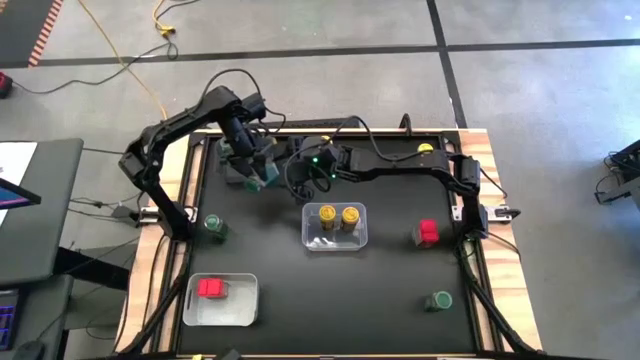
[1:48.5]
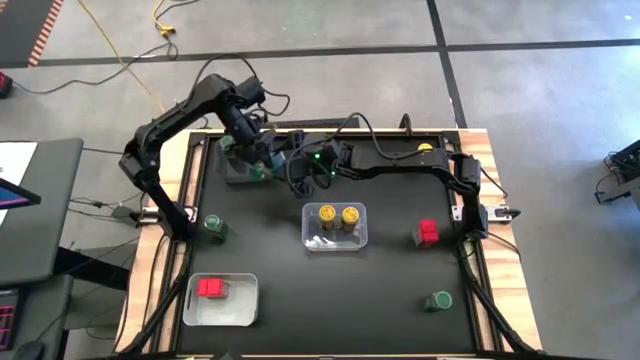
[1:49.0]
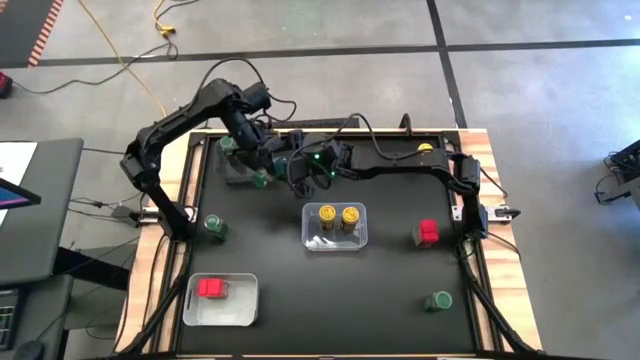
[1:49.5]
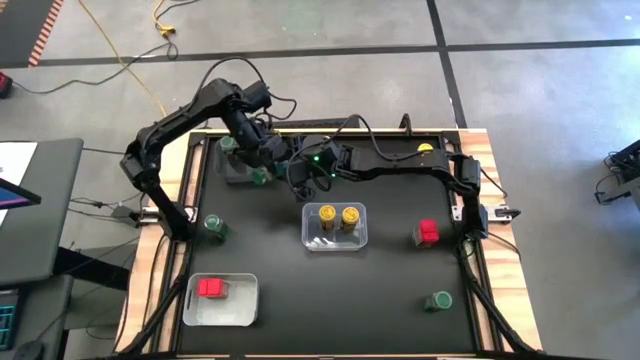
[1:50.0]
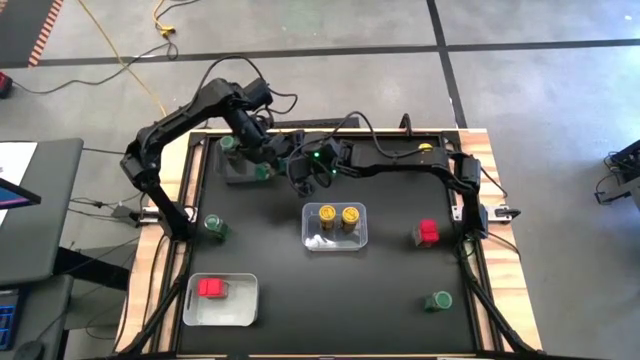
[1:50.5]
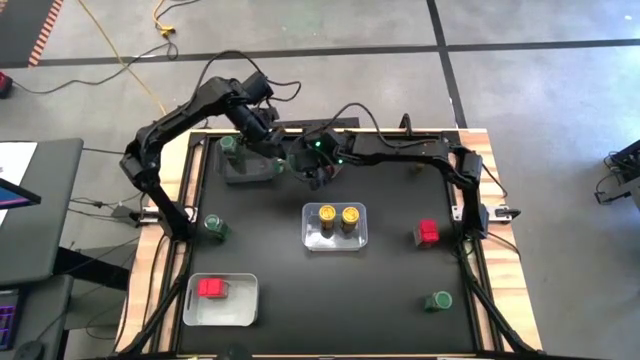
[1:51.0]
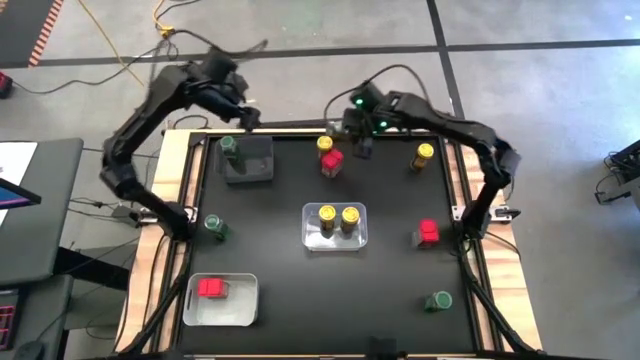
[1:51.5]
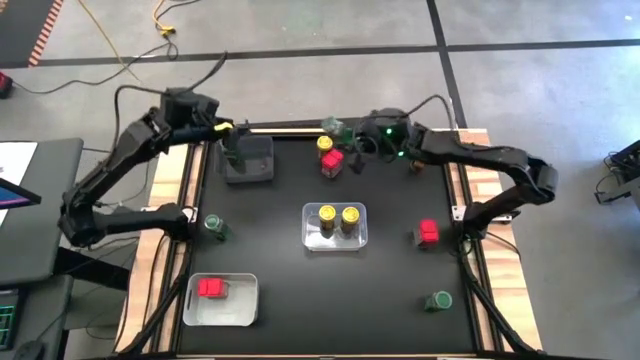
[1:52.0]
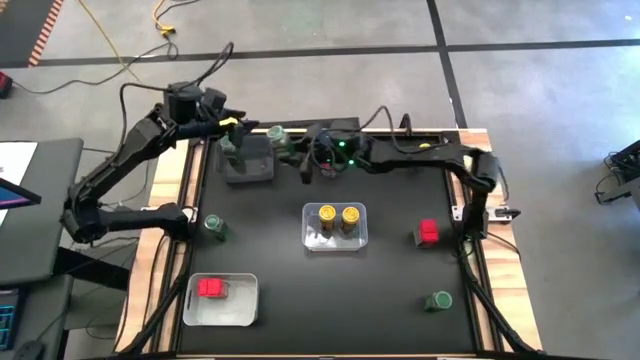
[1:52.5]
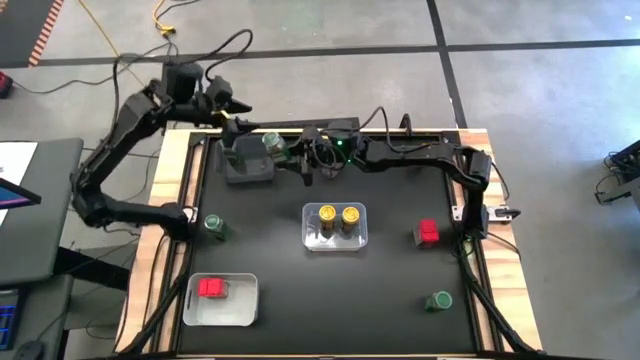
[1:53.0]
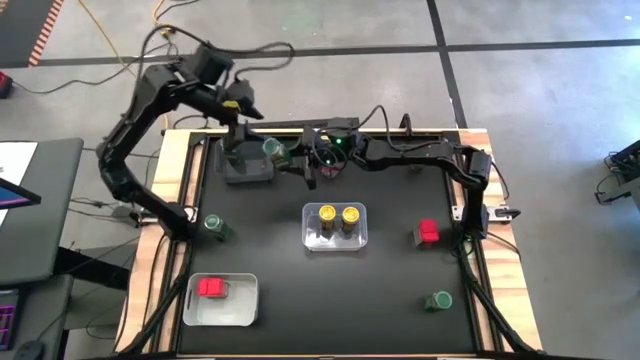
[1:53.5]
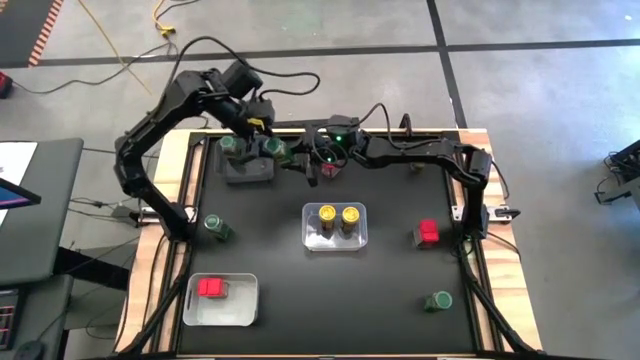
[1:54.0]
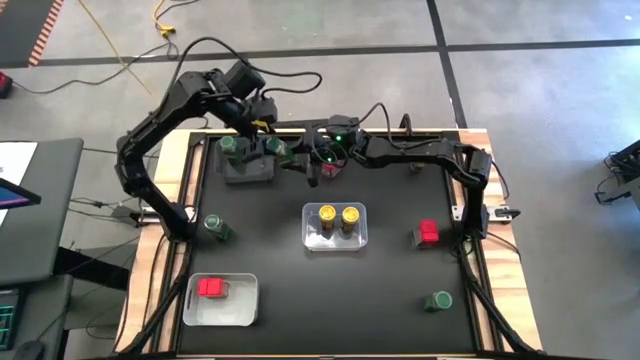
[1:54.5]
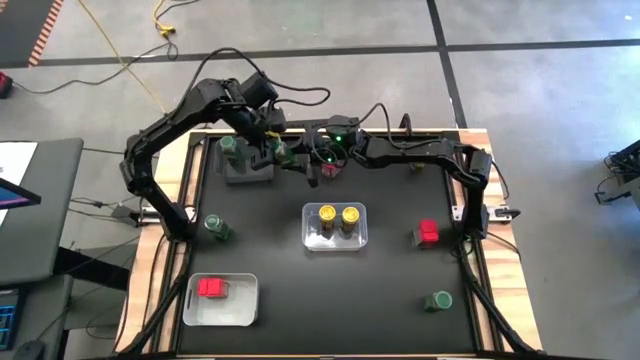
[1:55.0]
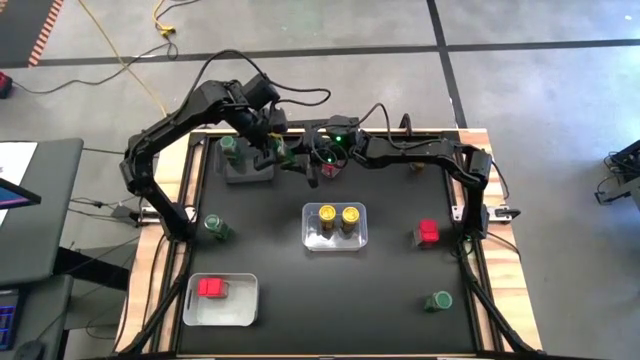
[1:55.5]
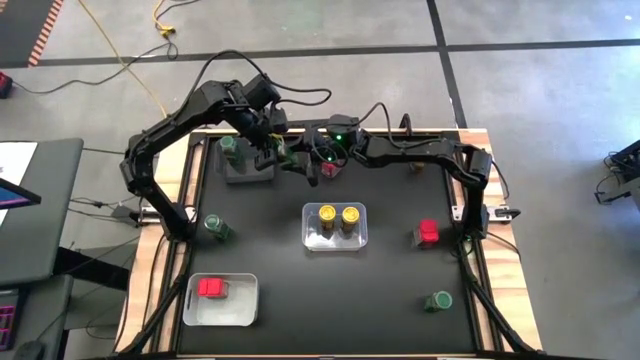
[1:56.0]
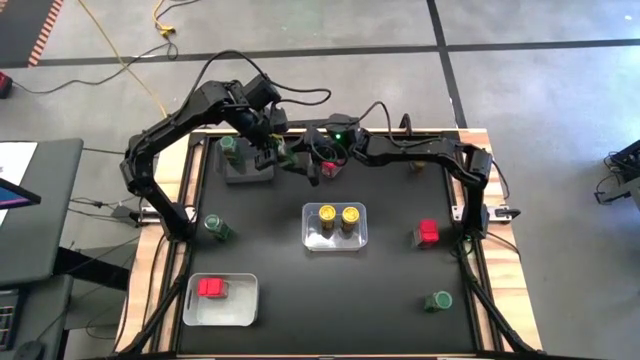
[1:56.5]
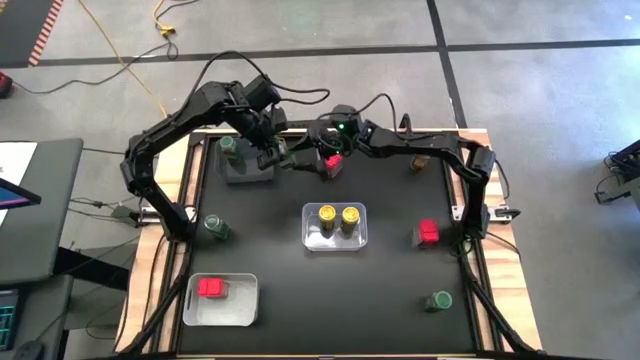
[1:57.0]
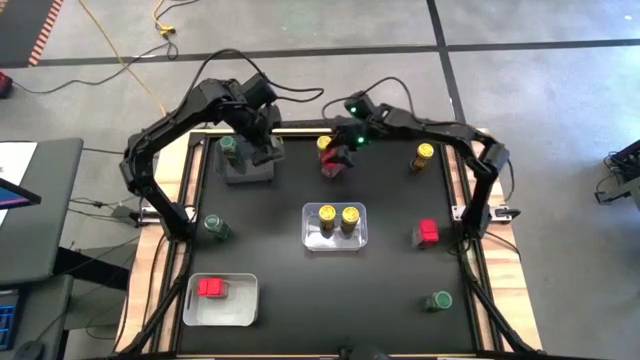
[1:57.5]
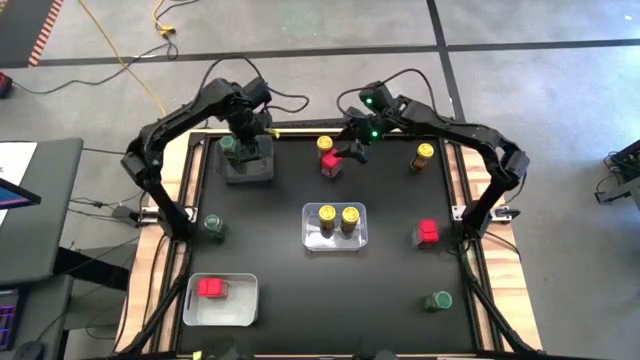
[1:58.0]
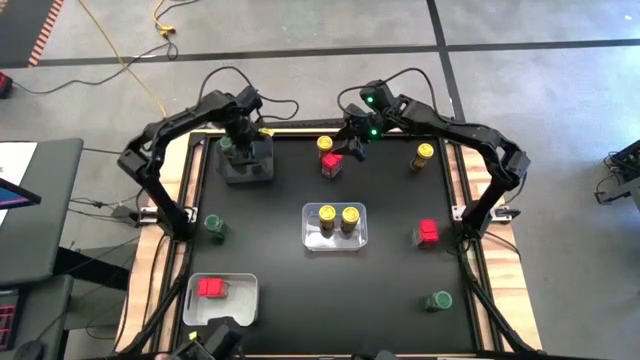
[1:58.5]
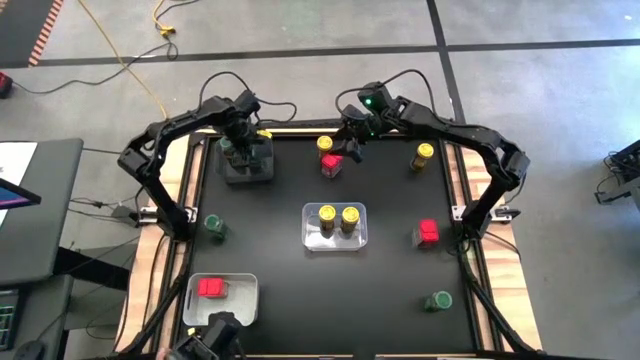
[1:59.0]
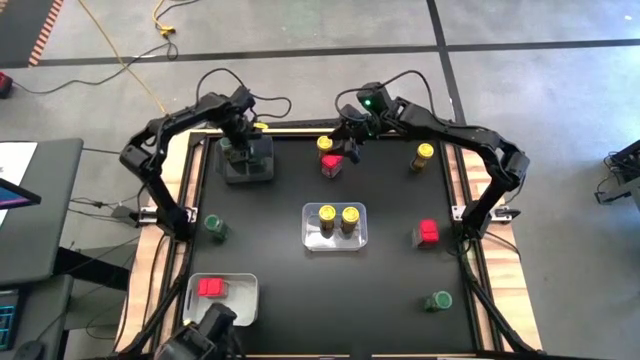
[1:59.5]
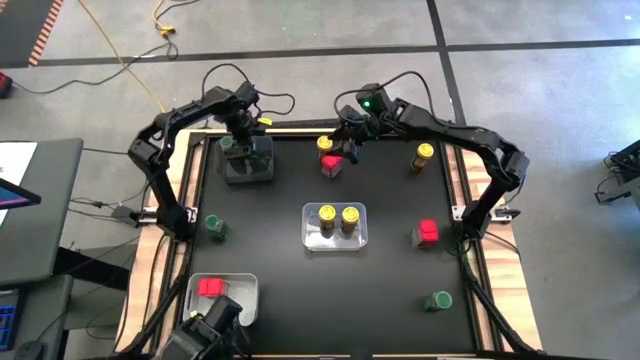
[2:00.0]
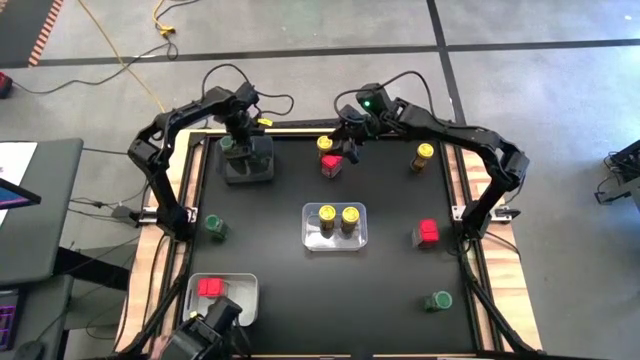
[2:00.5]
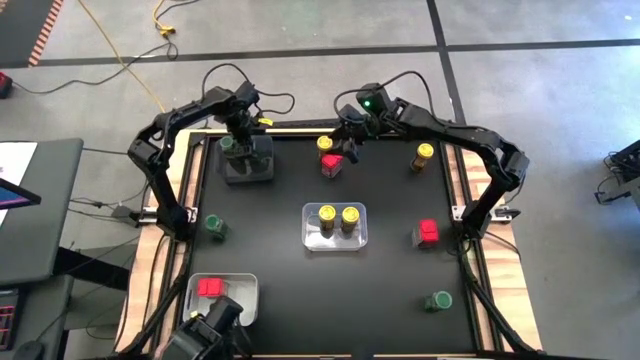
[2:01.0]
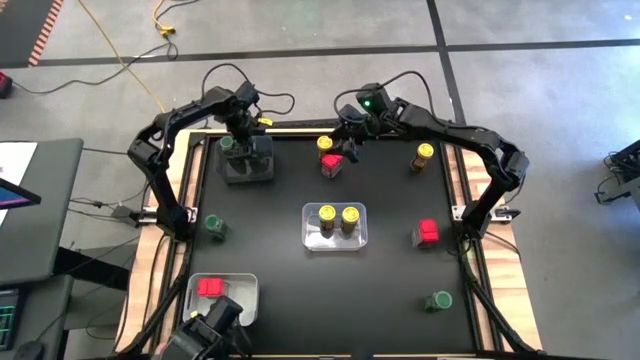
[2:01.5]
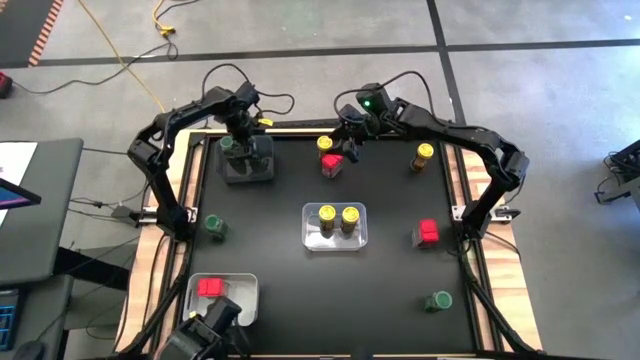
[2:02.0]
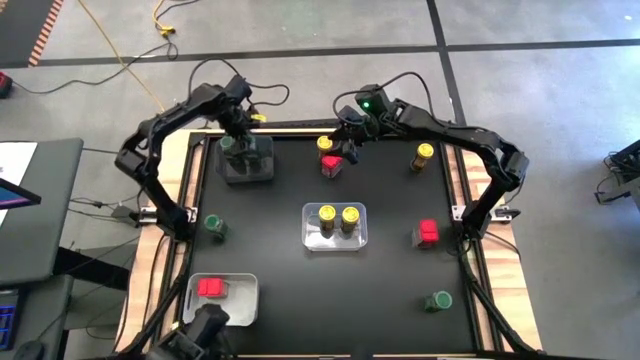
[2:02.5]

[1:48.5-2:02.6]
Task: Sort spices by type
Put the green seasoning bottle into the black bin

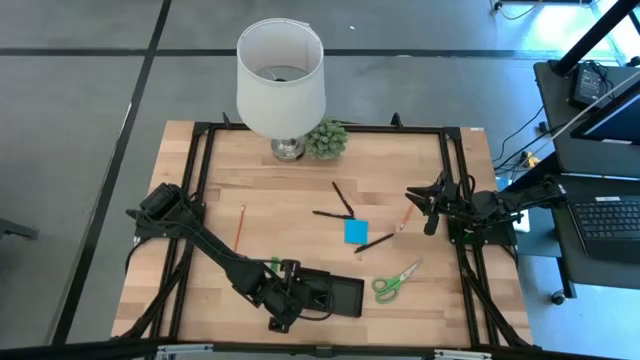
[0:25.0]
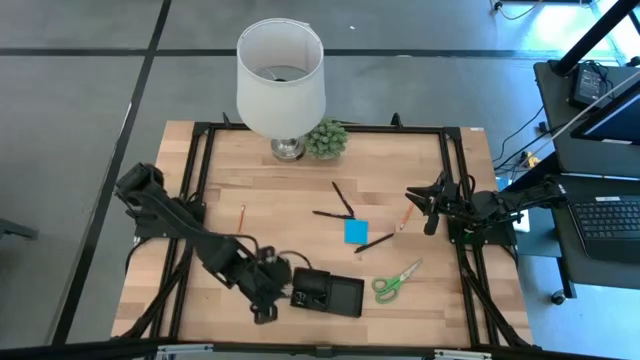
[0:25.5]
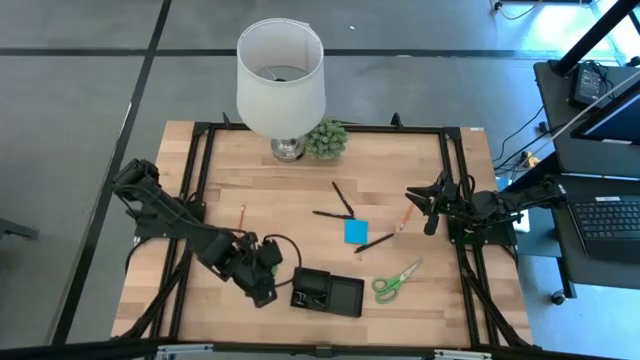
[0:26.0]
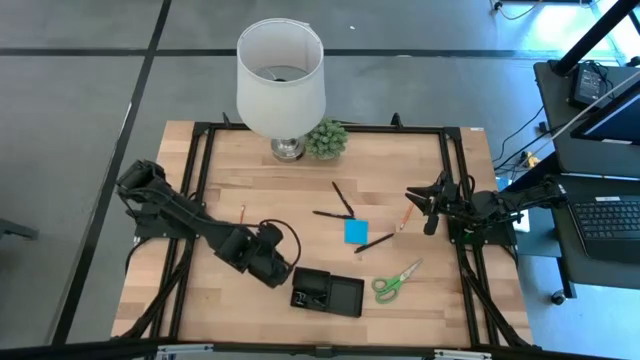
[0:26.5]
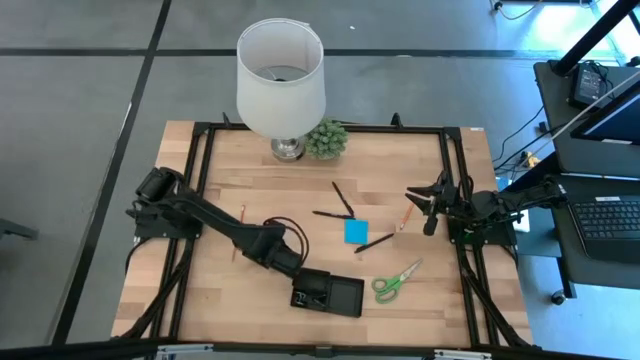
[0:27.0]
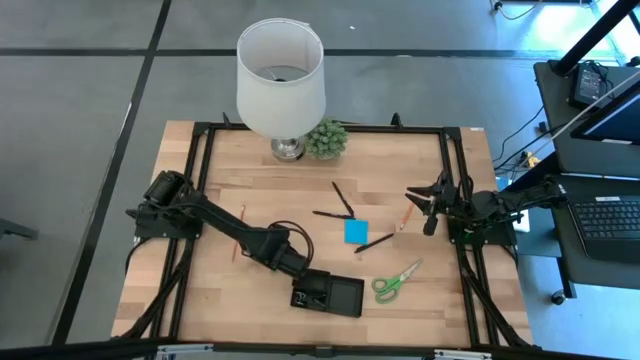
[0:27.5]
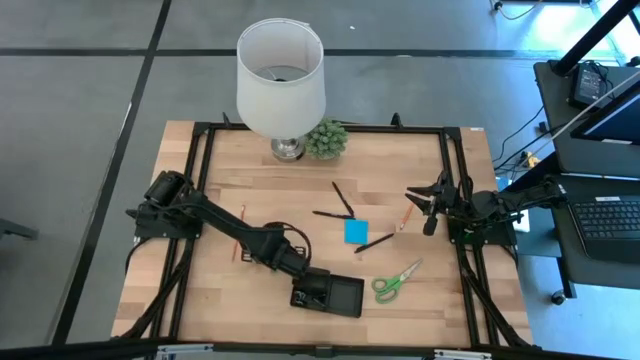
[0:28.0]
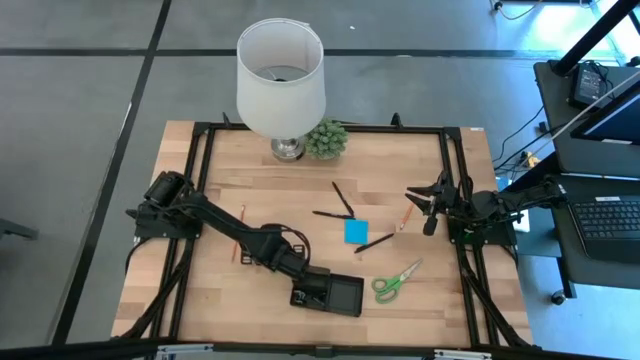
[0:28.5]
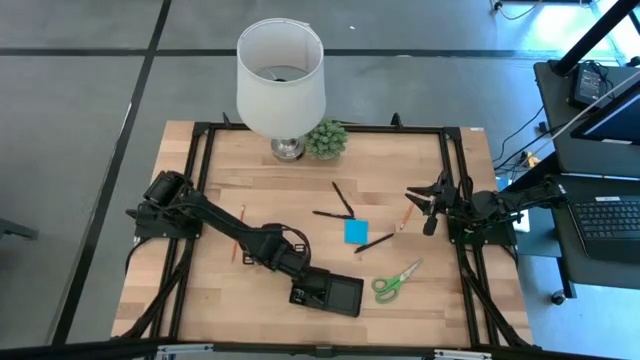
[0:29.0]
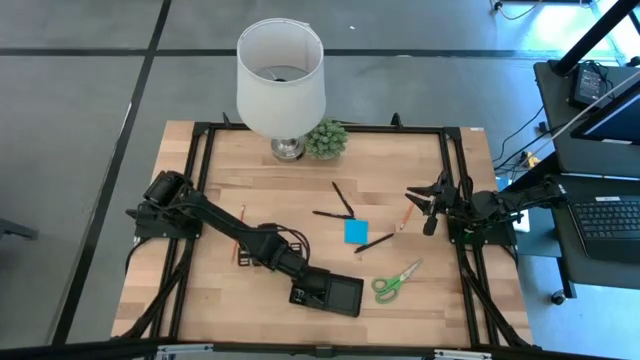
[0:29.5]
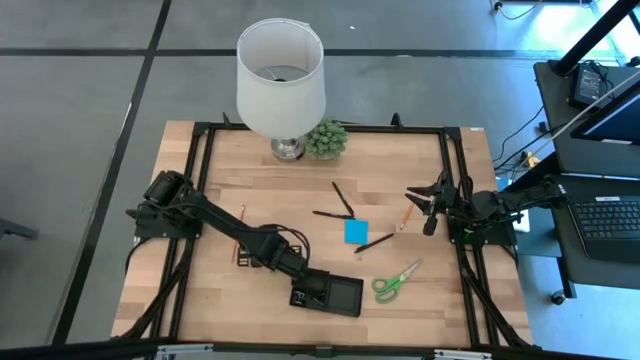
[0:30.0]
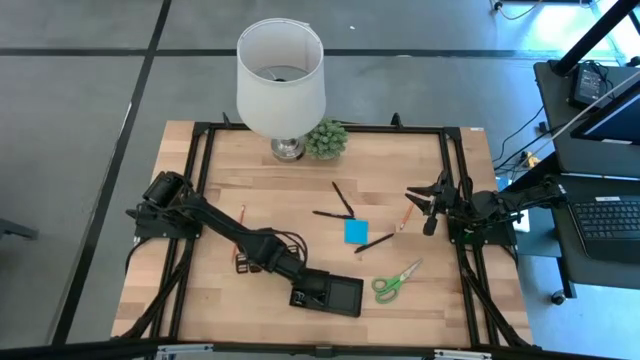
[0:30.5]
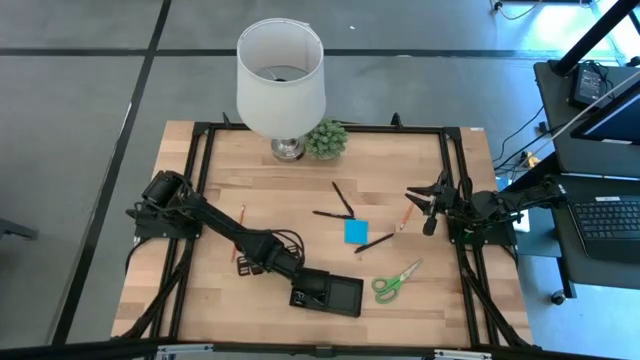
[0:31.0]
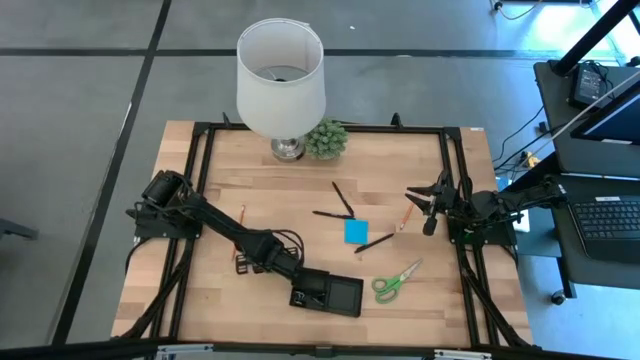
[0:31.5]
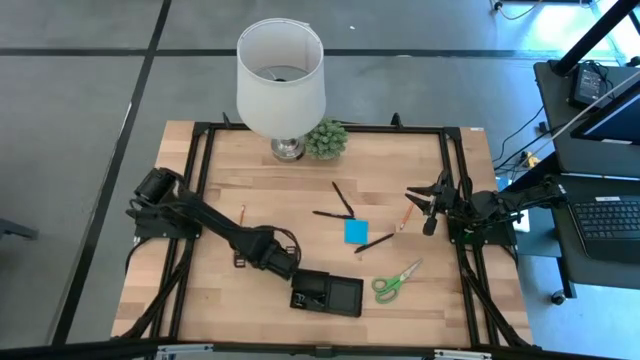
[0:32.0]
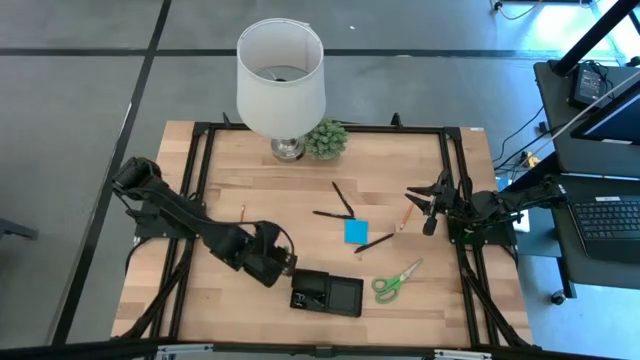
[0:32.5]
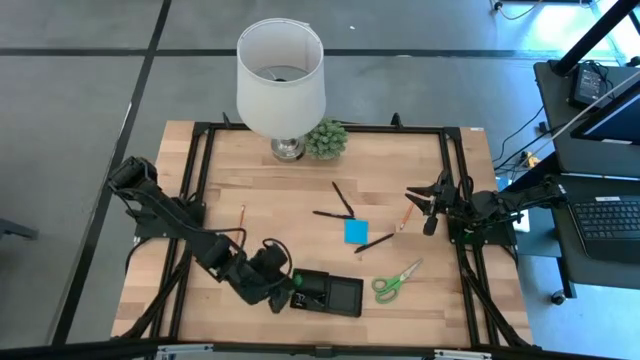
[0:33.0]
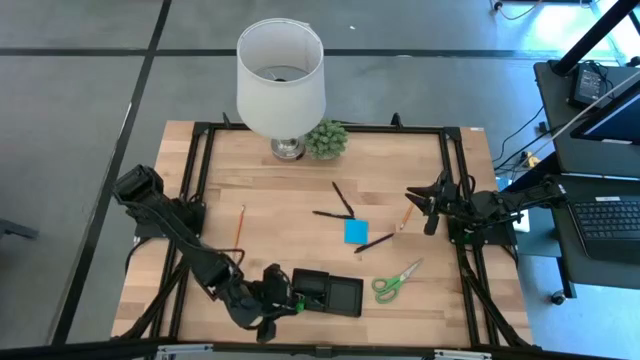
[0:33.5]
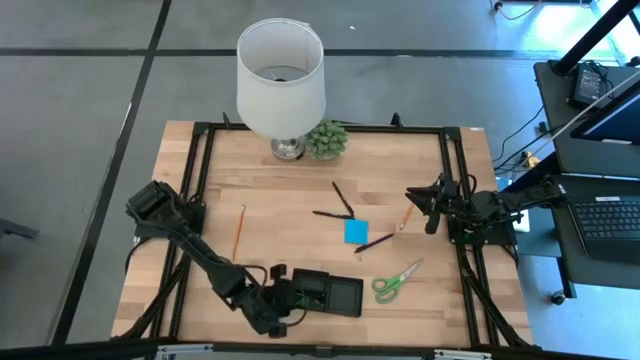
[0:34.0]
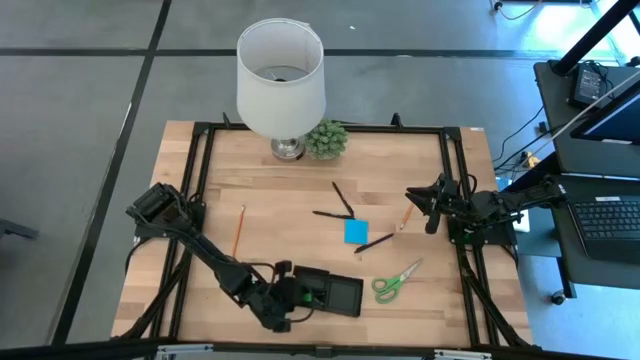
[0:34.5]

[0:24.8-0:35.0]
Task: Pick and place office supplies into organizer
Put the green eraser into the desk organizer
